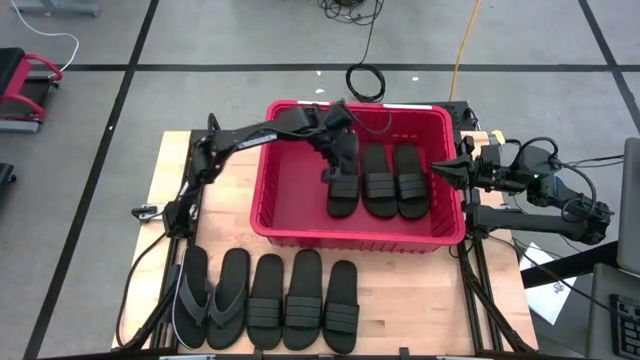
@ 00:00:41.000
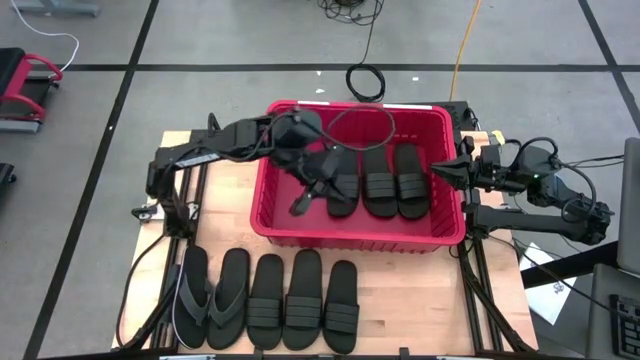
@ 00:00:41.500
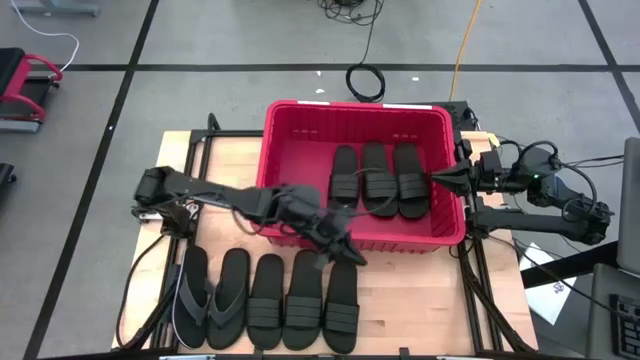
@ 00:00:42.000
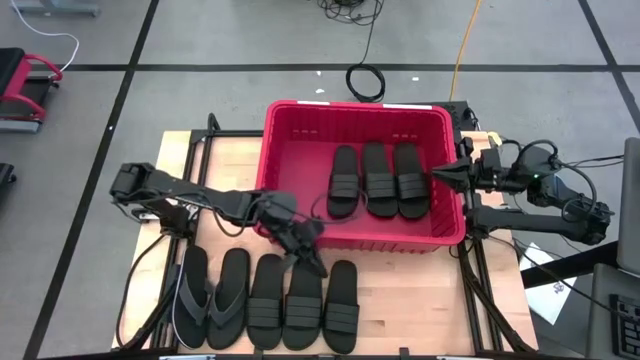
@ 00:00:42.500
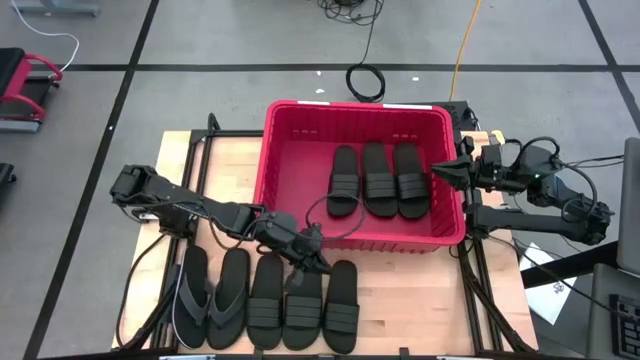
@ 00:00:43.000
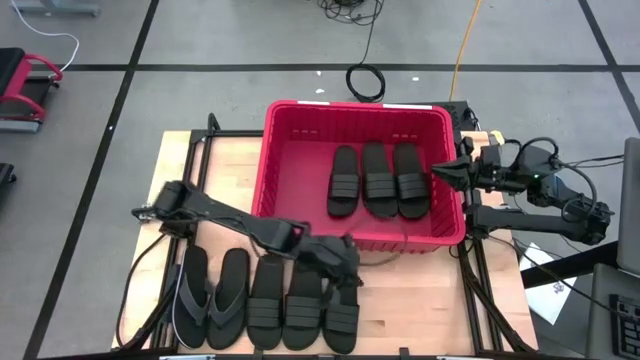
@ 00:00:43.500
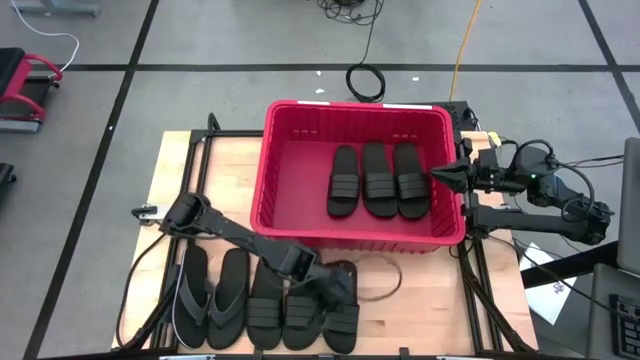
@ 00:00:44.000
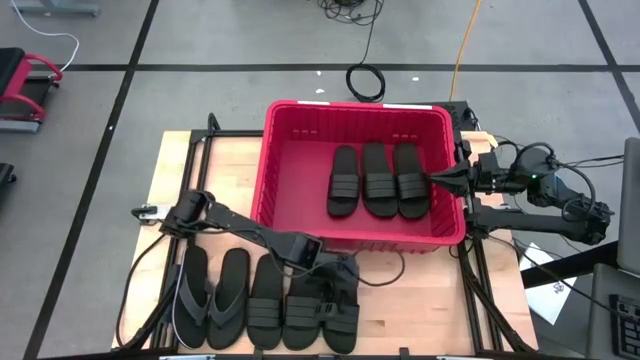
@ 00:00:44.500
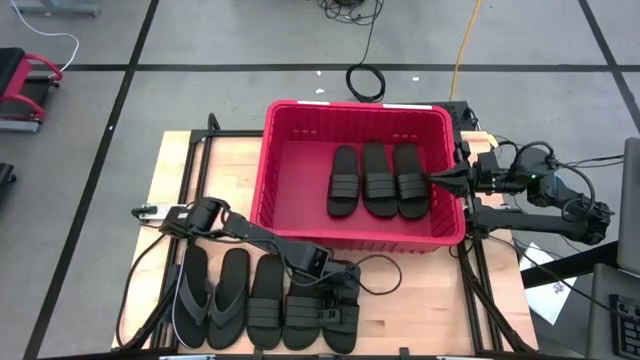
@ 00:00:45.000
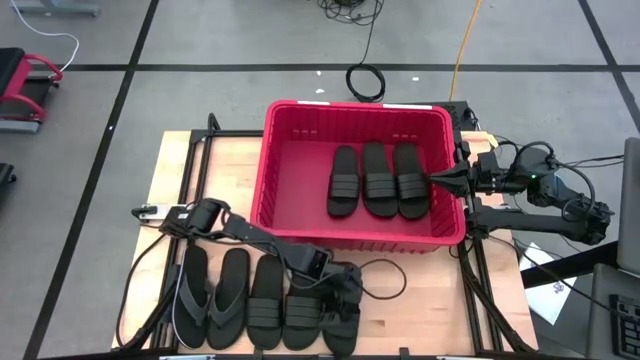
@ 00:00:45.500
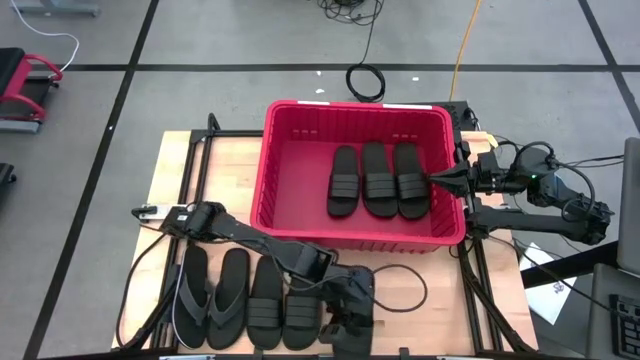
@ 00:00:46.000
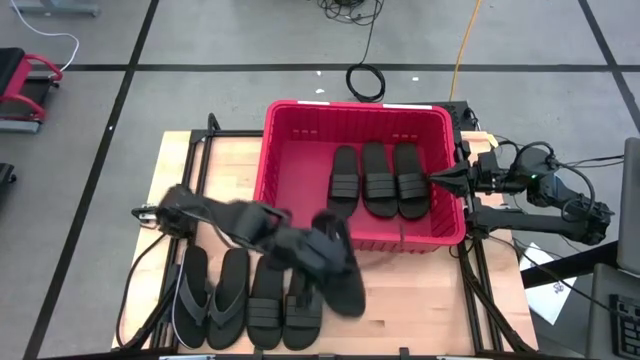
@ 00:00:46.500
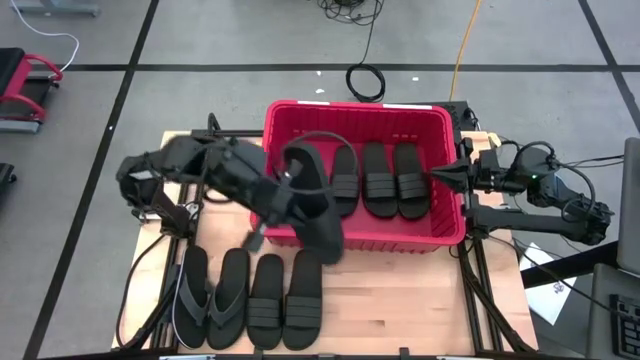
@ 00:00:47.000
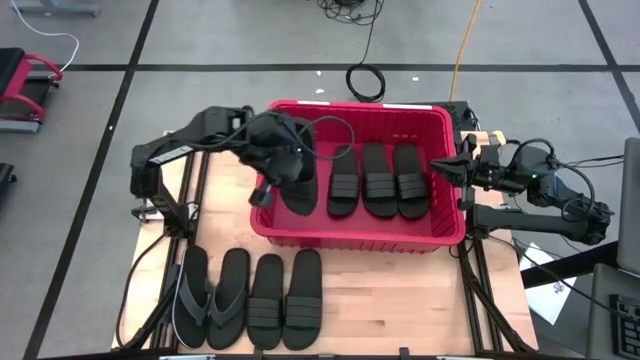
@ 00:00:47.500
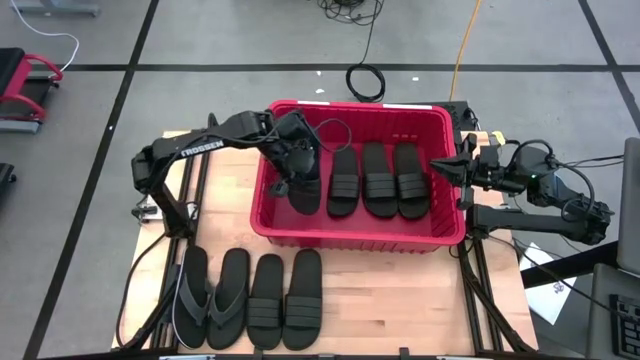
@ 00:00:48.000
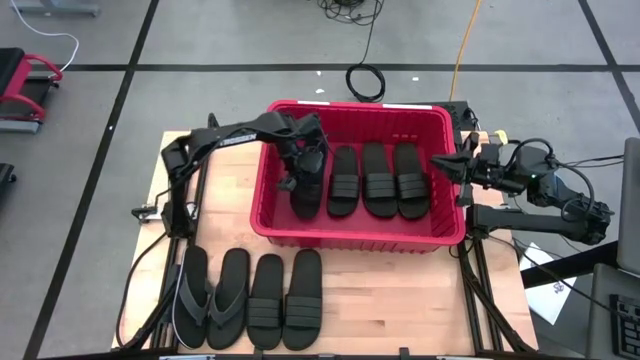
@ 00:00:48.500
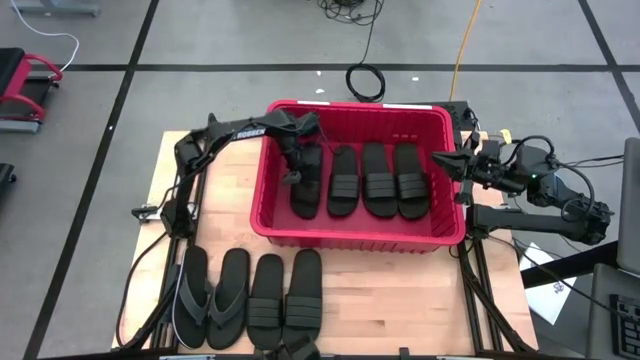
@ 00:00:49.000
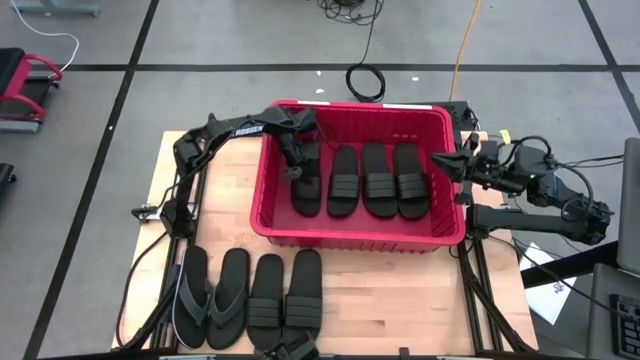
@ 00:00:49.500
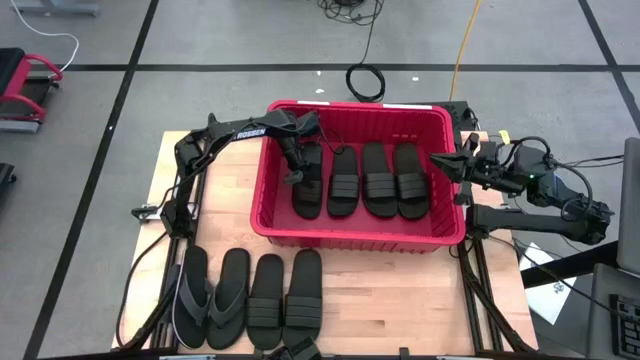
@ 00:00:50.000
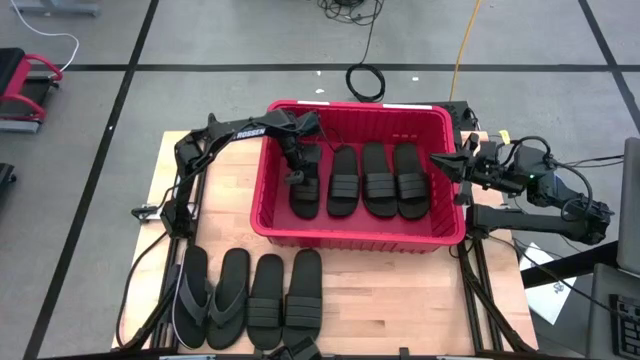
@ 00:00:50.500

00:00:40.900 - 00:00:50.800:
Task: Pick and place slides into bin
Put the black slipper into the red bin

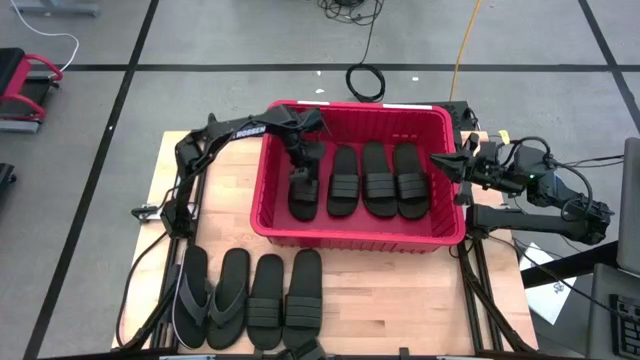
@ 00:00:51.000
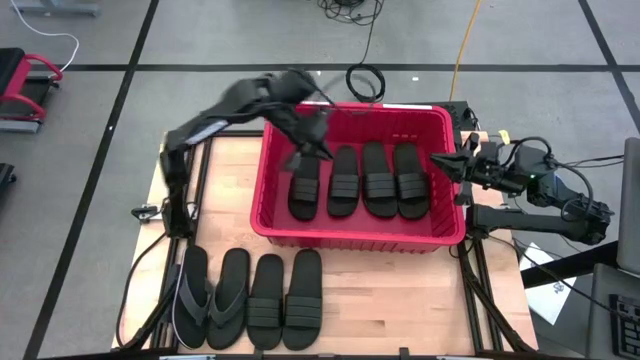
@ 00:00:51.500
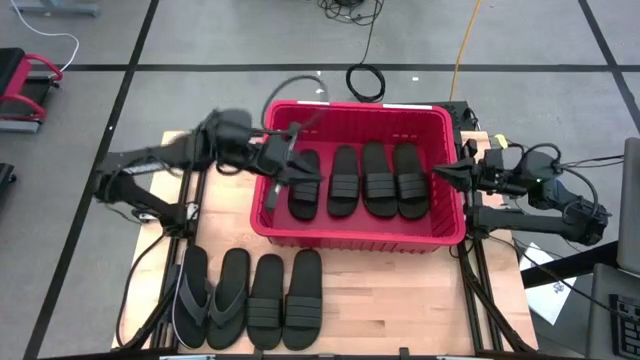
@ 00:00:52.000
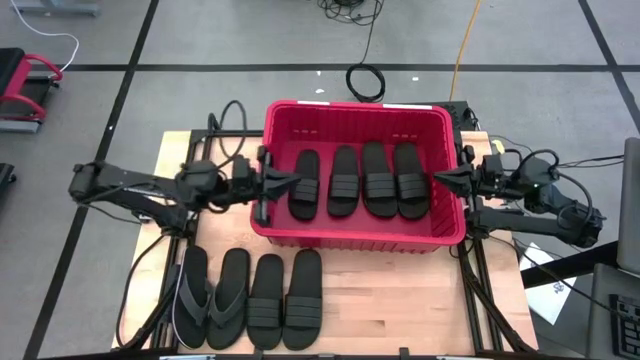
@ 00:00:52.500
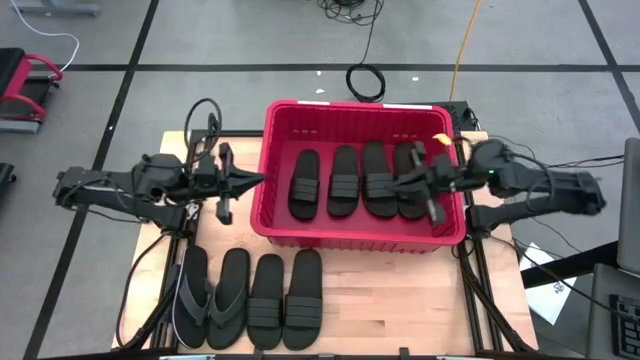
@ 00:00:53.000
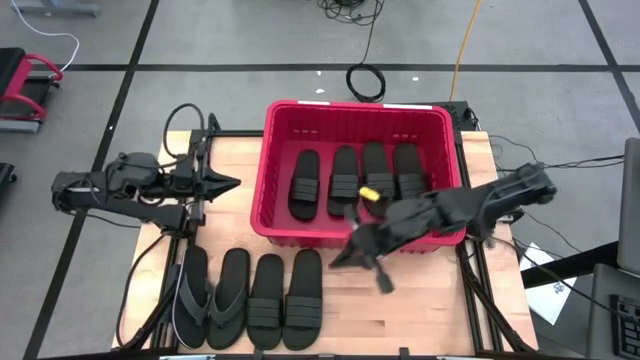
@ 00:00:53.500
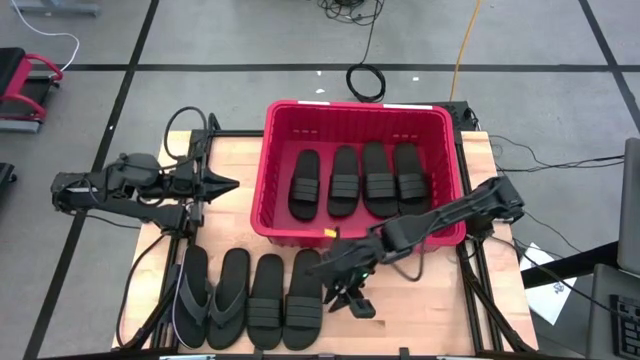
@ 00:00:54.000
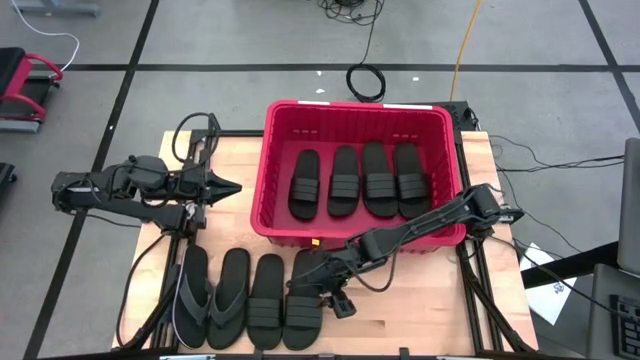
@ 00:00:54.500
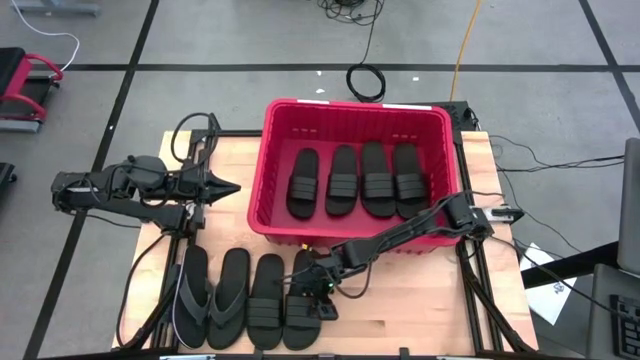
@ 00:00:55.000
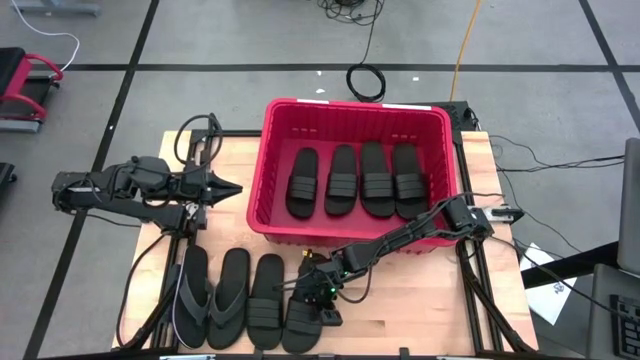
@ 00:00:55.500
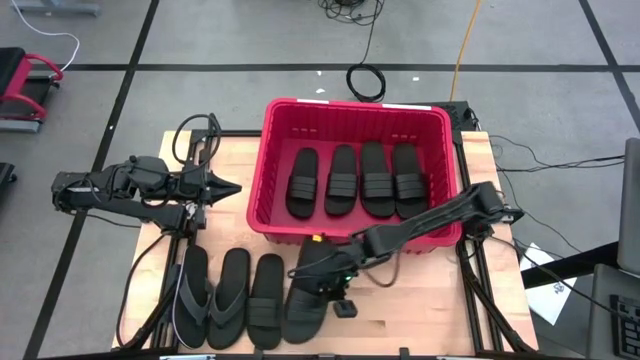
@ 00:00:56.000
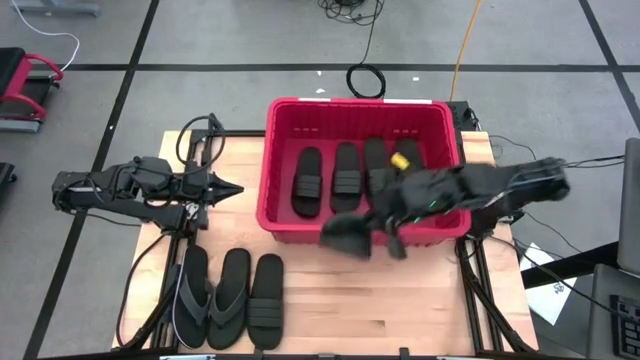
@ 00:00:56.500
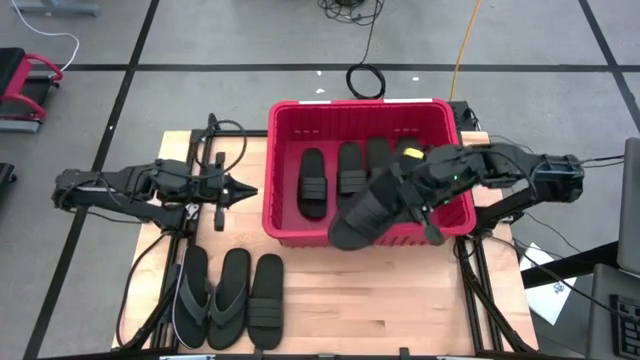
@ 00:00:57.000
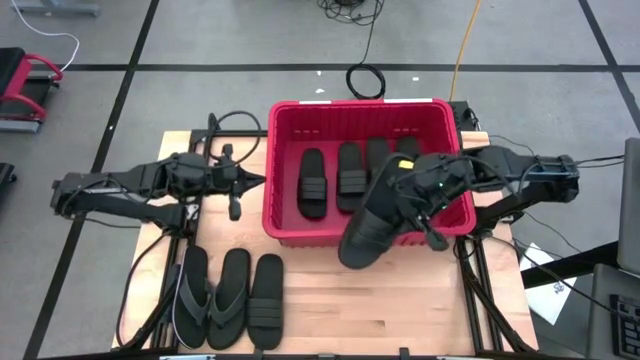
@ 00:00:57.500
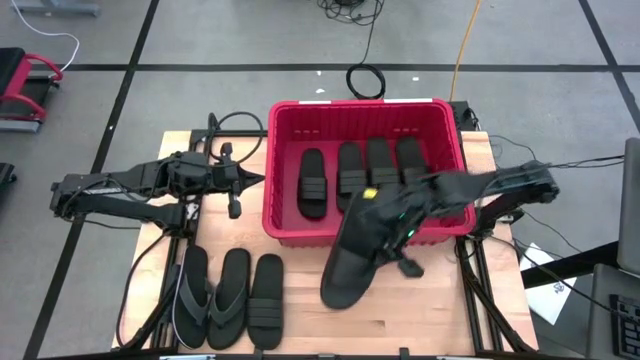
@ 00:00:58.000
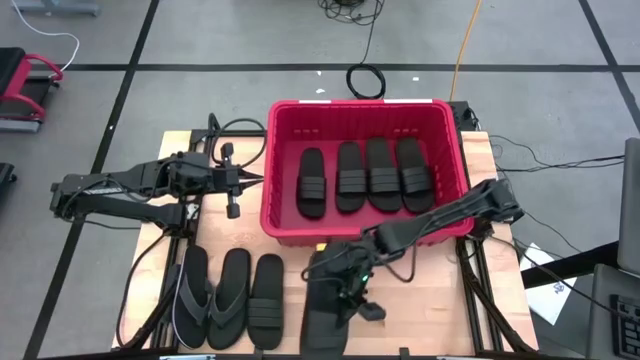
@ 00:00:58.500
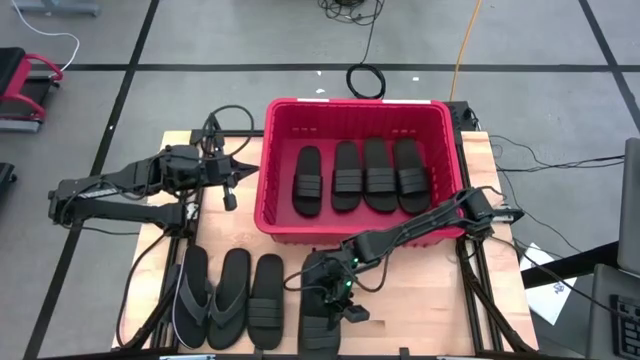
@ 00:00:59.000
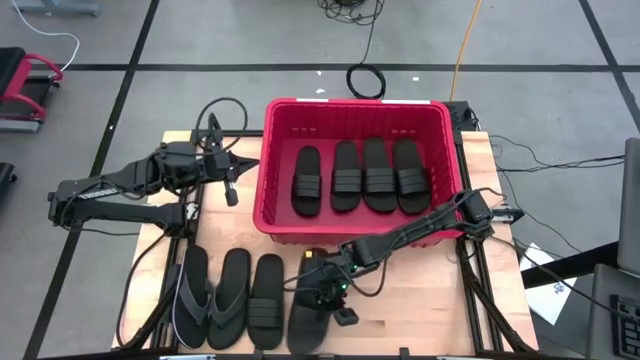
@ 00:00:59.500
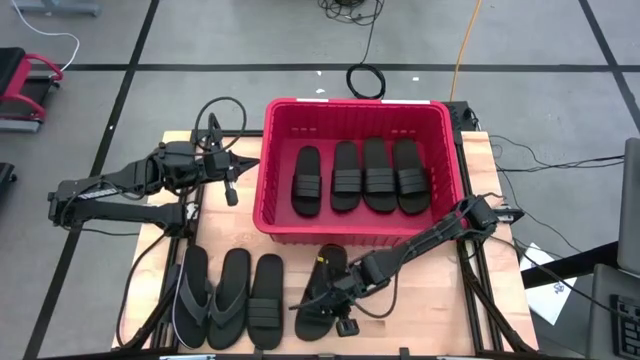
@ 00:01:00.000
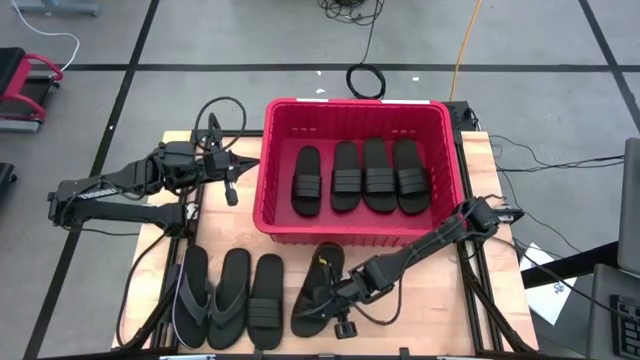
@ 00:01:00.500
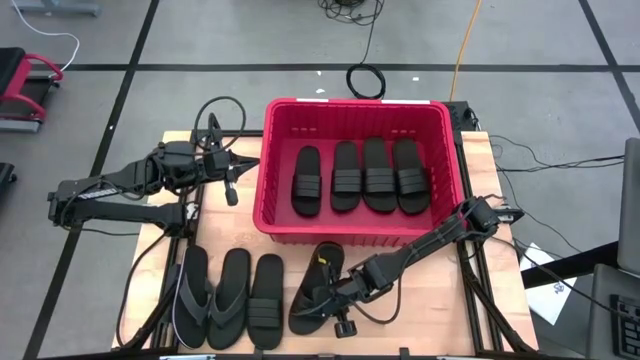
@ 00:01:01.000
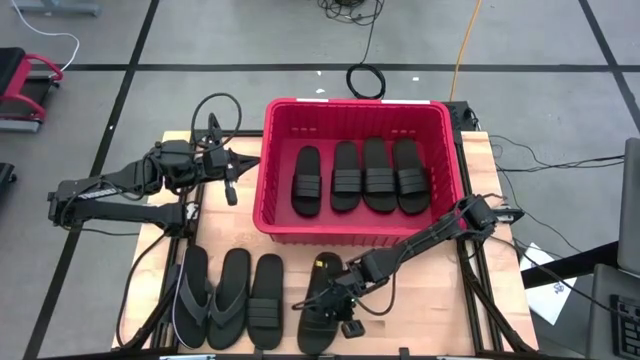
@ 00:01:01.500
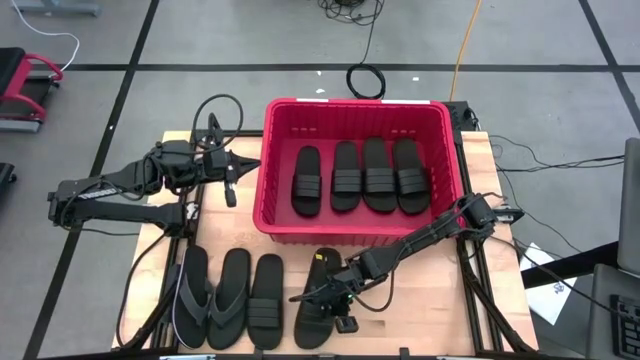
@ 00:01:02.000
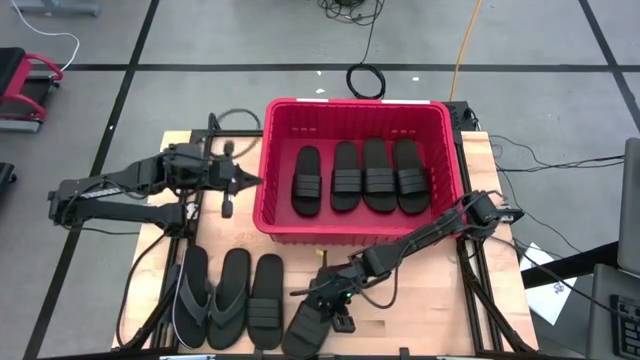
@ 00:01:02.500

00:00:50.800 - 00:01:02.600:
Put the black slipper into the red bin

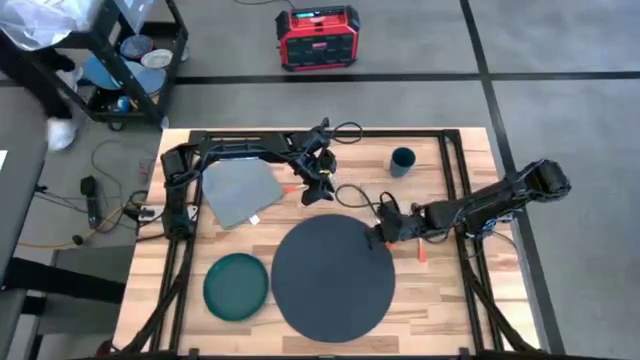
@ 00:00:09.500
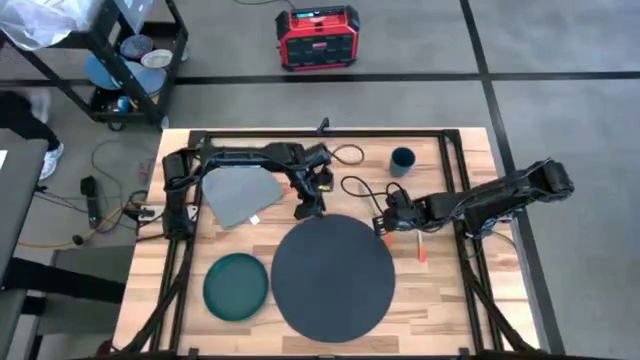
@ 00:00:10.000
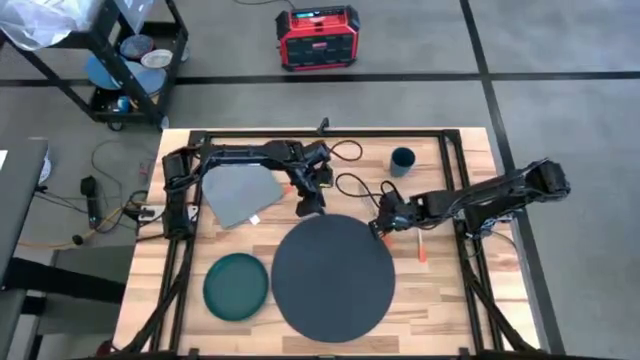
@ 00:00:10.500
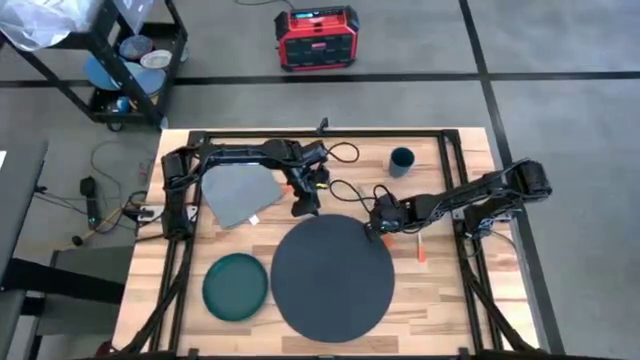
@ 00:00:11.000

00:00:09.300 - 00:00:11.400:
Task: Set table place
Put the orange table knife on the blue tablemat
